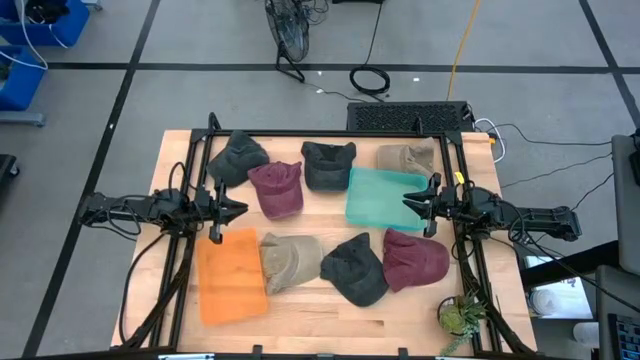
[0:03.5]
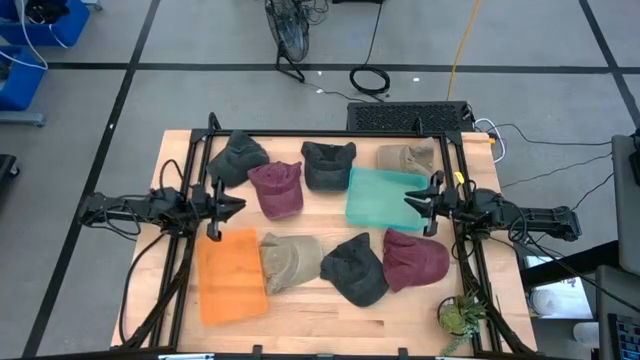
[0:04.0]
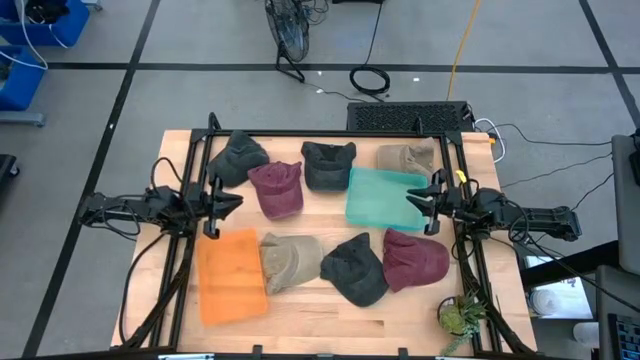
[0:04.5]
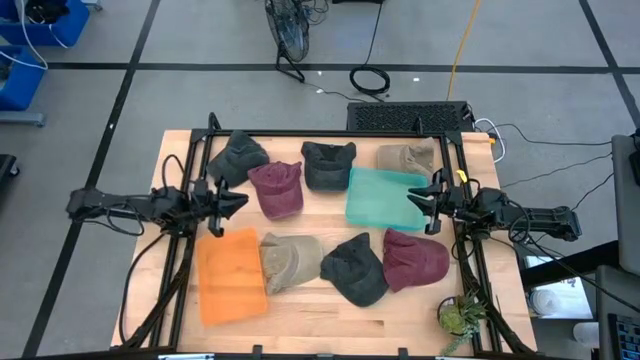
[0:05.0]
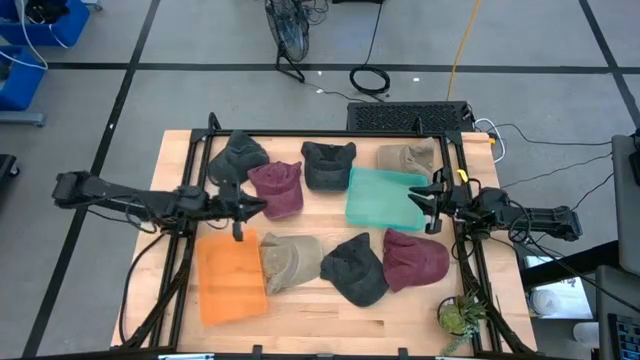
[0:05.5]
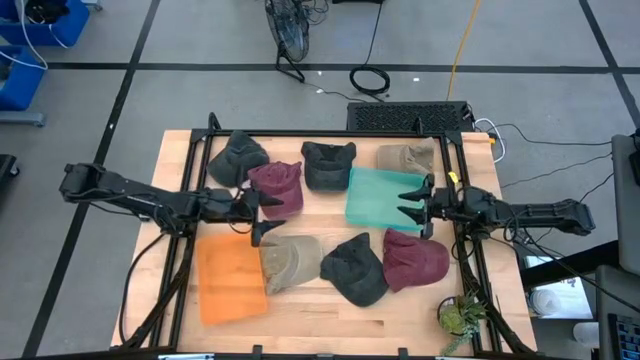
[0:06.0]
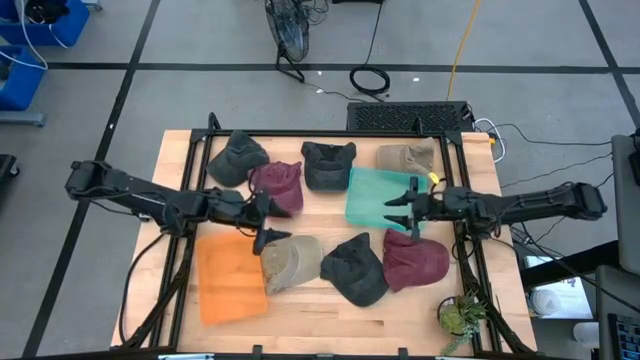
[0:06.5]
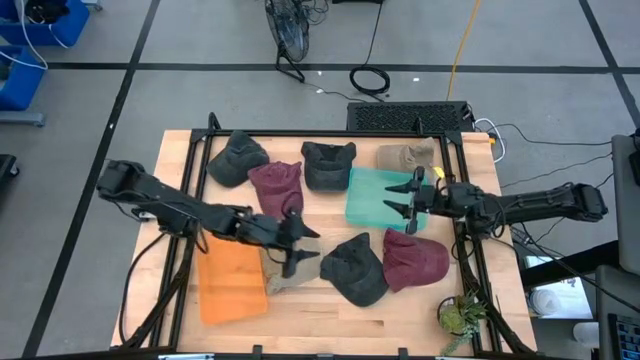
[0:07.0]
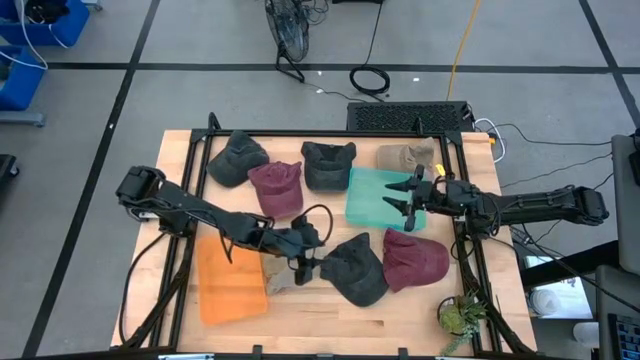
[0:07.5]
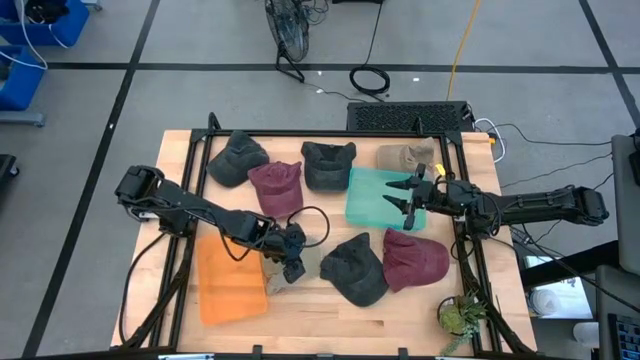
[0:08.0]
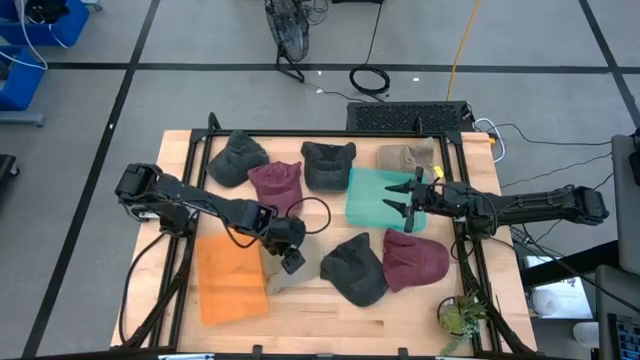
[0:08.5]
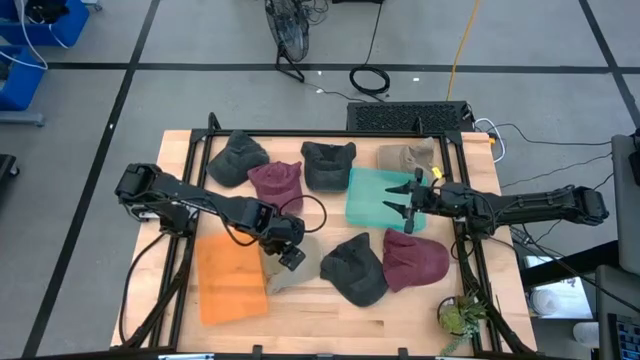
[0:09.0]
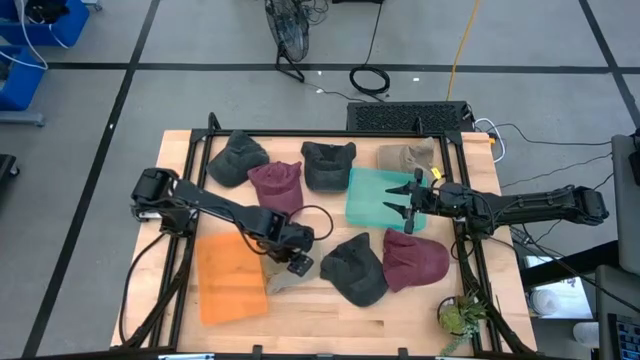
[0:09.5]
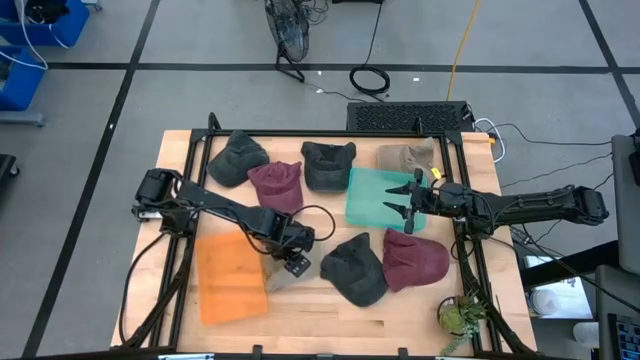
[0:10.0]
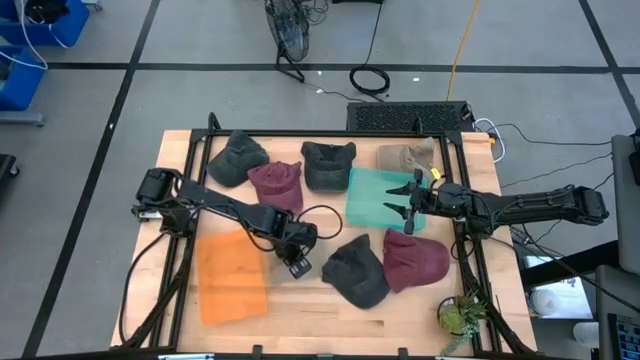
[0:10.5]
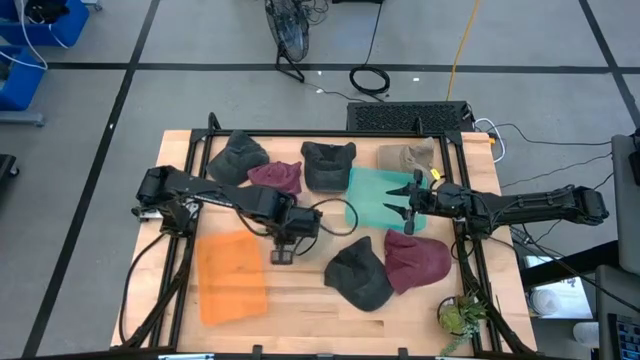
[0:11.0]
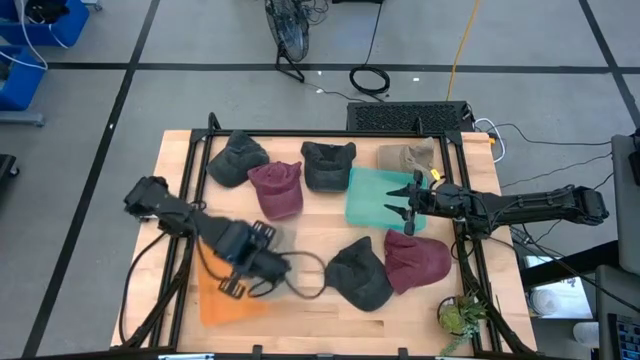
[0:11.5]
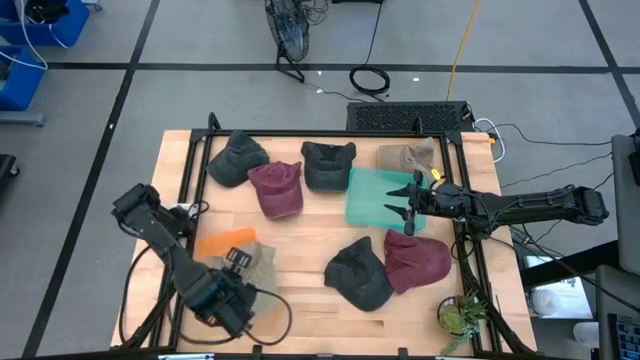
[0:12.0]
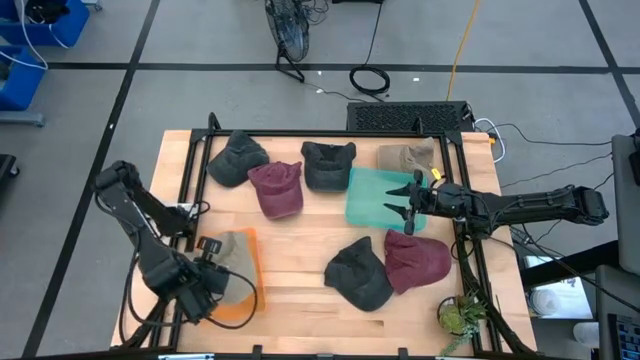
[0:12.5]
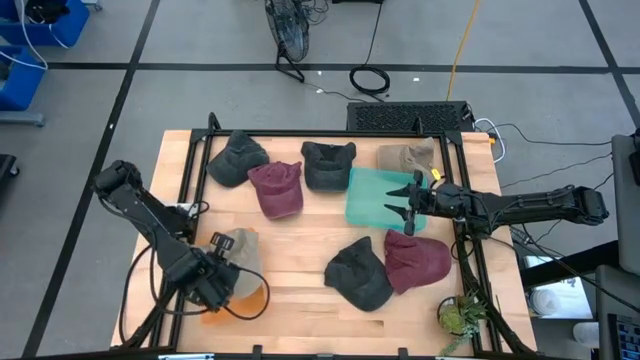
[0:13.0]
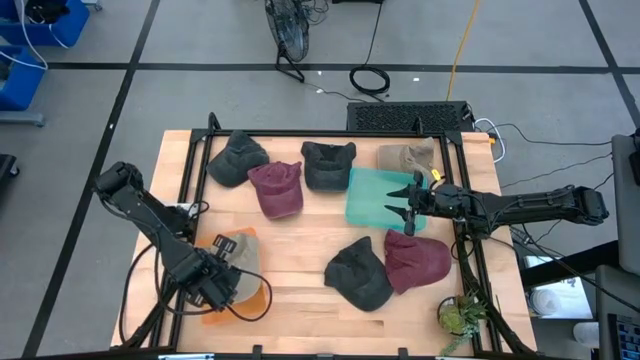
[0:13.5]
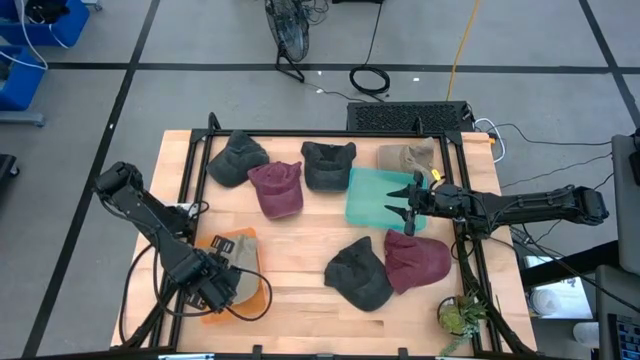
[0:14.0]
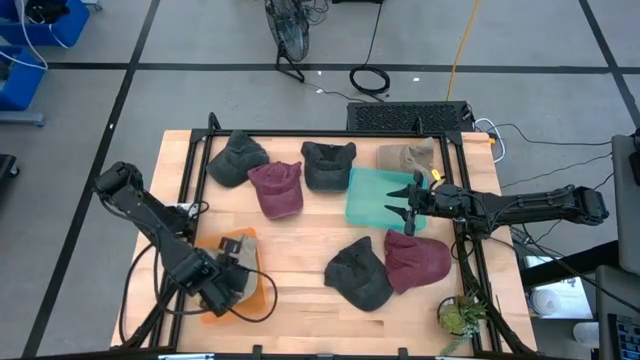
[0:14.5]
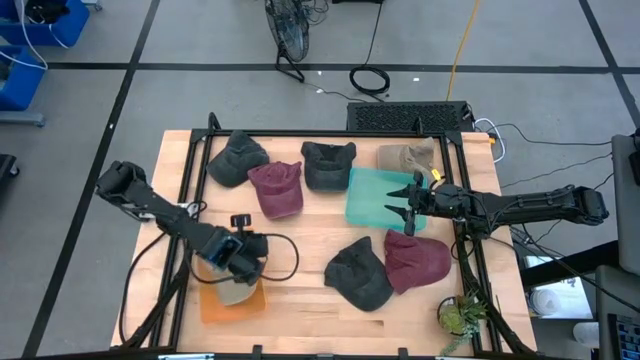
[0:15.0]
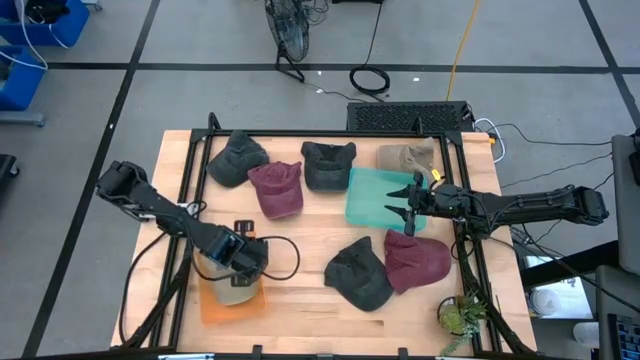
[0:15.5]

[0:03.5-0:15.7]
Task: Pick & Place hat
Put the left brown cap into the orange bin

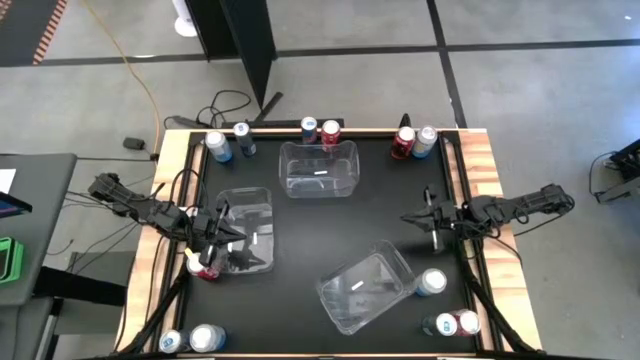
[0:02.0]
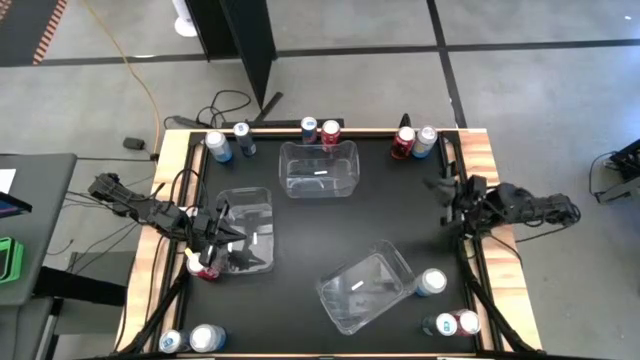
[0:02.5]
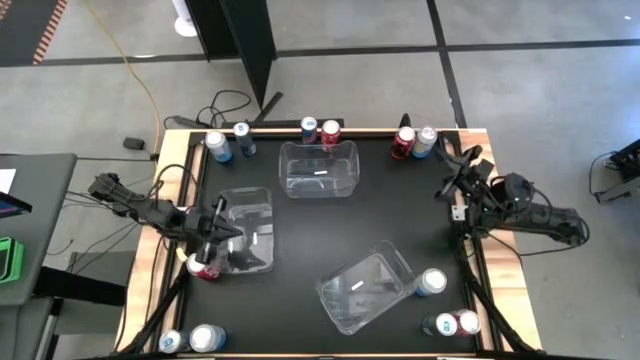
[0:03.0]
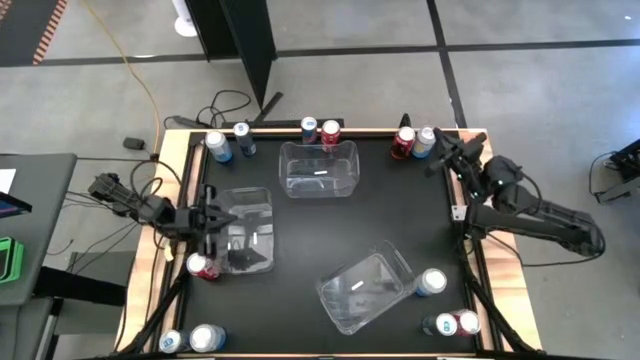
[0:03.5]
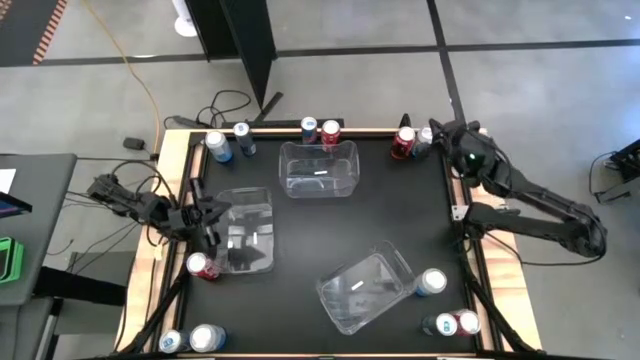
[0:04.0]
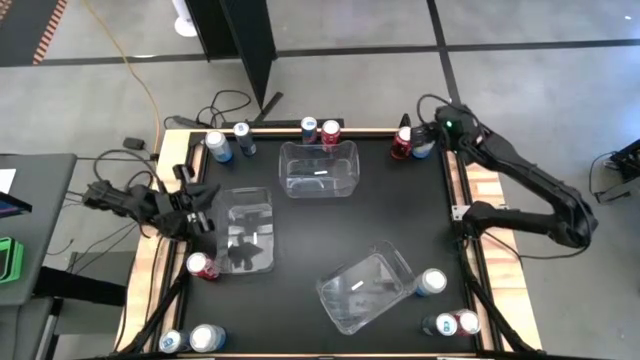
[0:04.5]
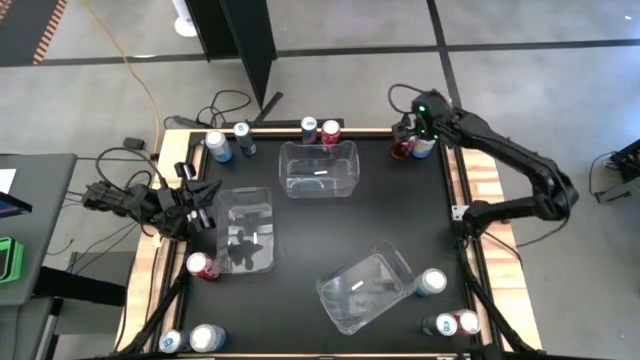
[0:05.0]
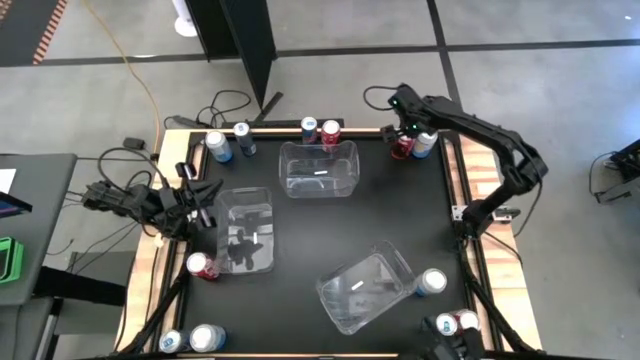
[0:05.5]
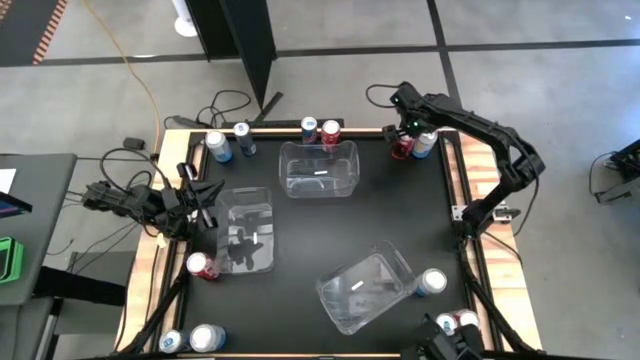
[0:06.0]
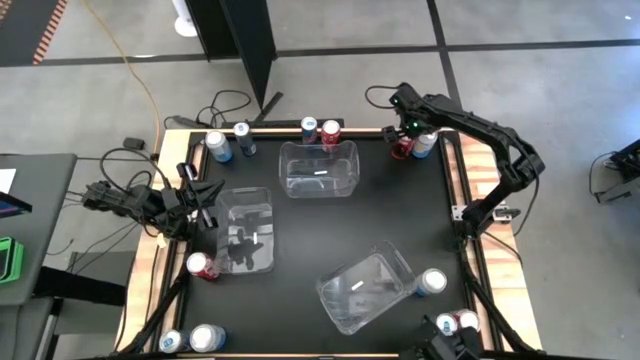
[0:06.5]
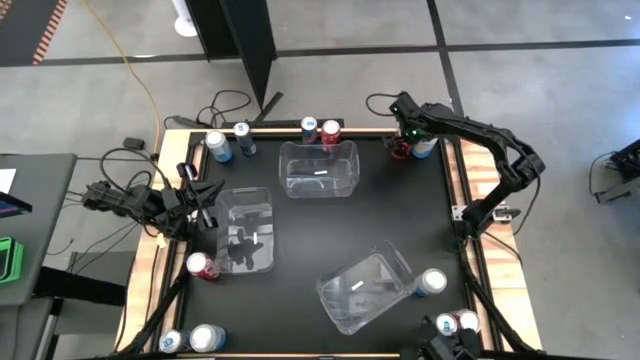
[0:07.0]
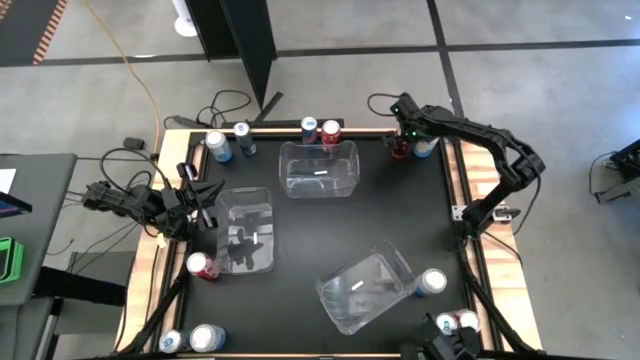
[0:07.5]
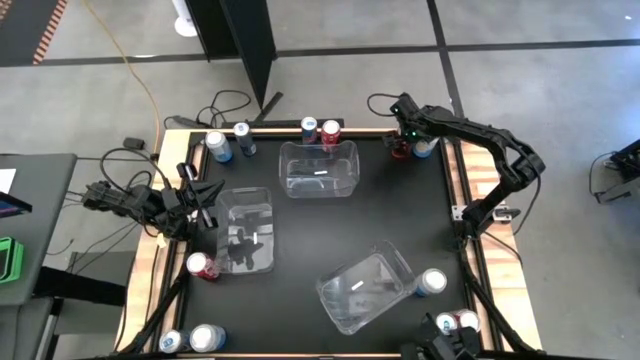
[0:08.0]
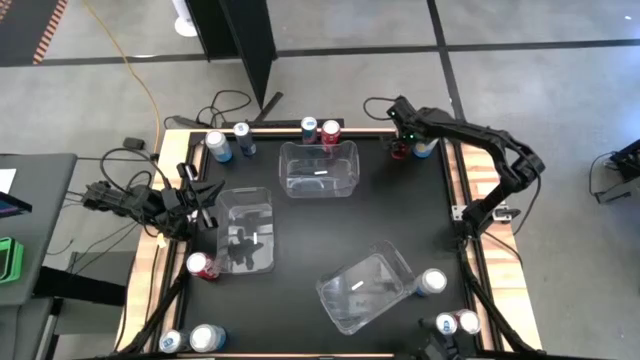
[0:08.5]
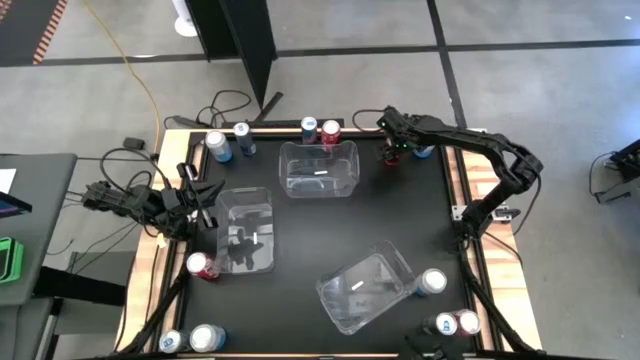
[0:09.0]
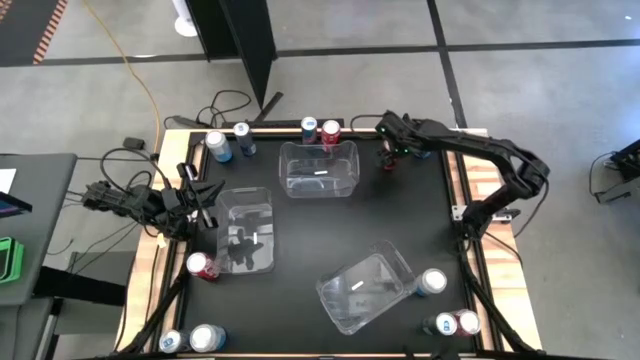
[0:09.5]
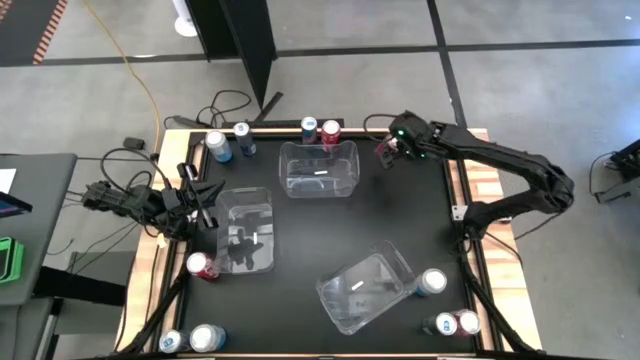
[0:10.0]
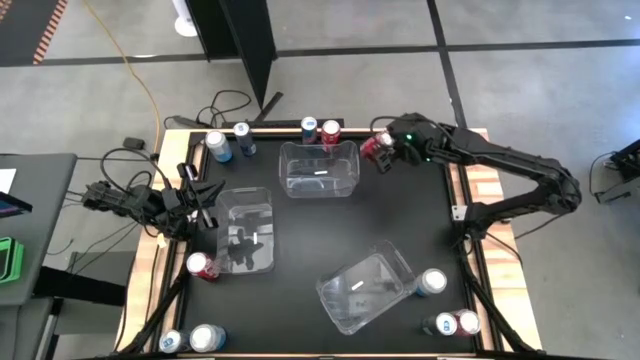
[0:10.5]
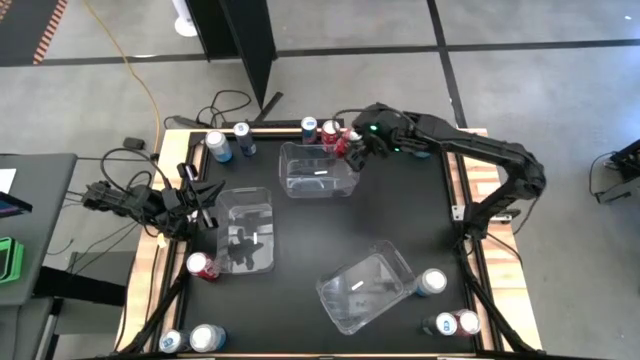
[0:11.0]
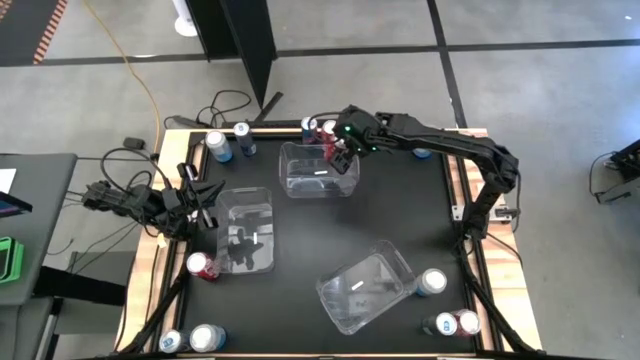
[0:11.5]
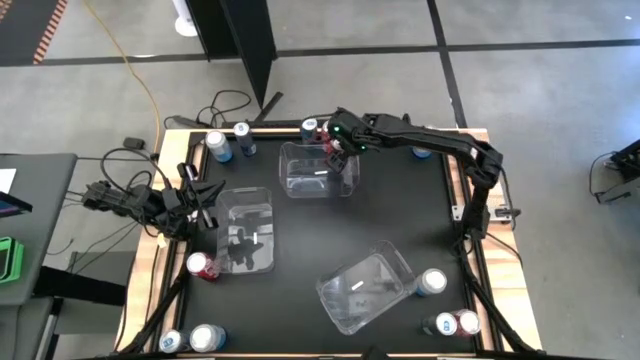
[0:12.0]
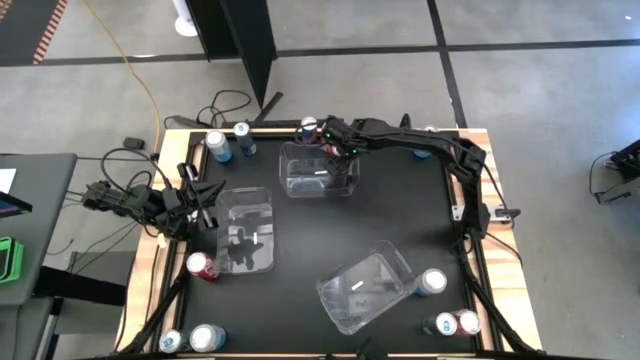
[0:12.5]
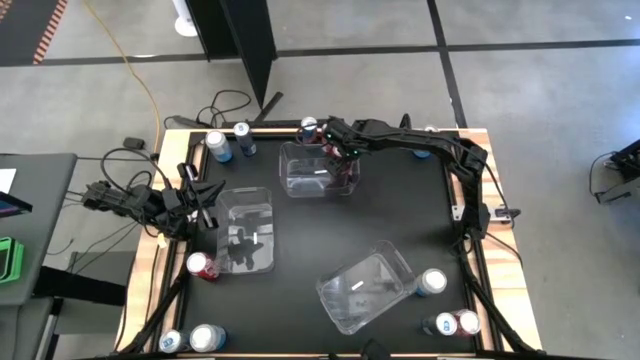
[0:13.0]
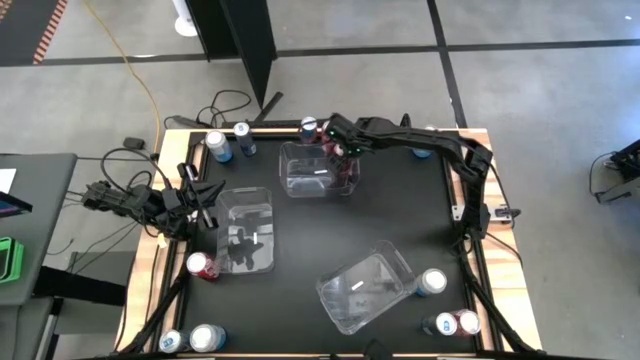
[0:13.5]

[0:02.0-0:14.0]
Task: Sort soda cans
Put the red soda can into the top transparent bin
